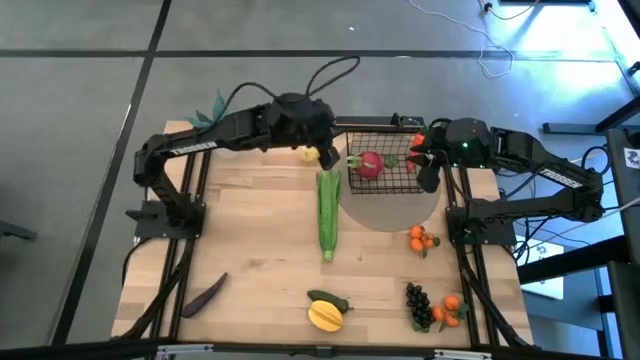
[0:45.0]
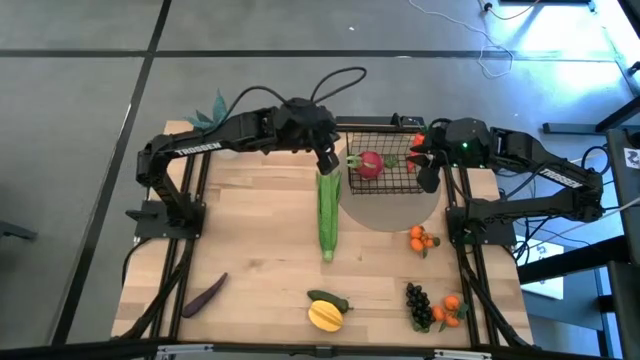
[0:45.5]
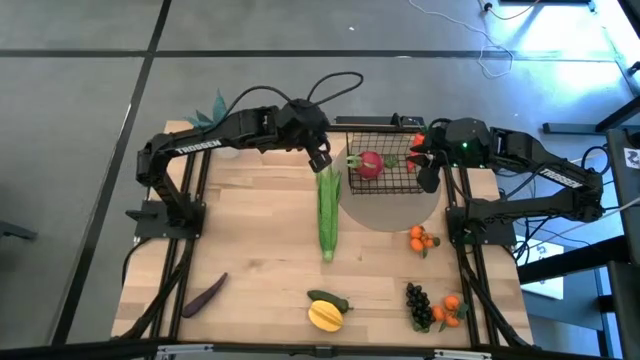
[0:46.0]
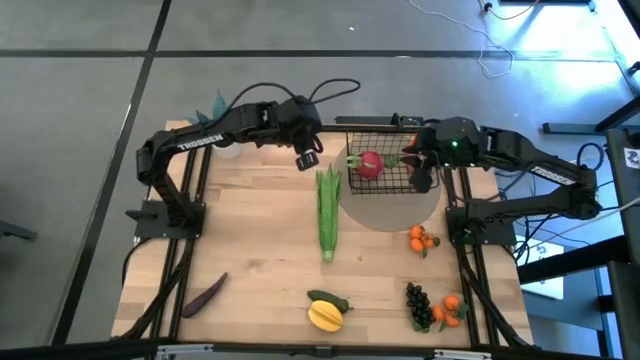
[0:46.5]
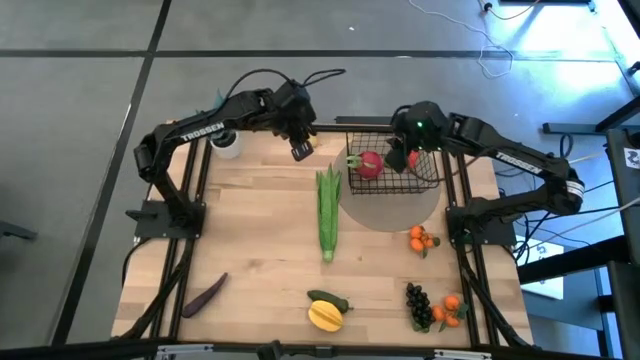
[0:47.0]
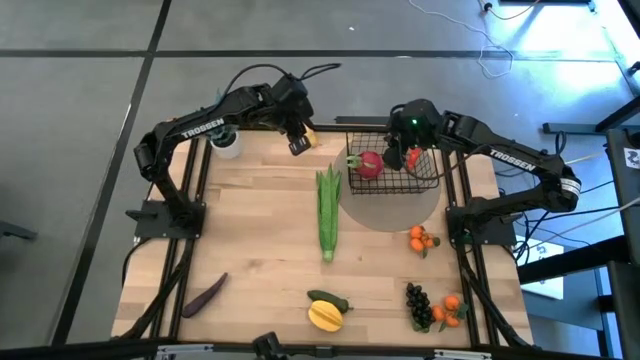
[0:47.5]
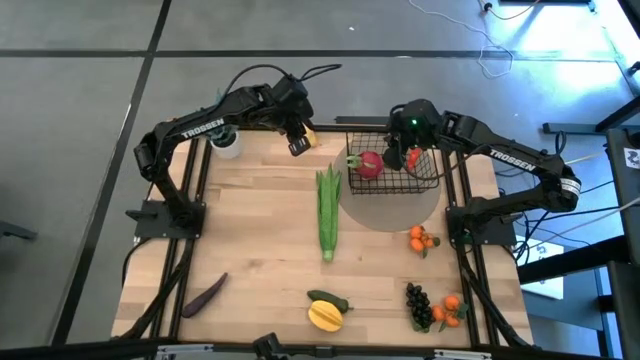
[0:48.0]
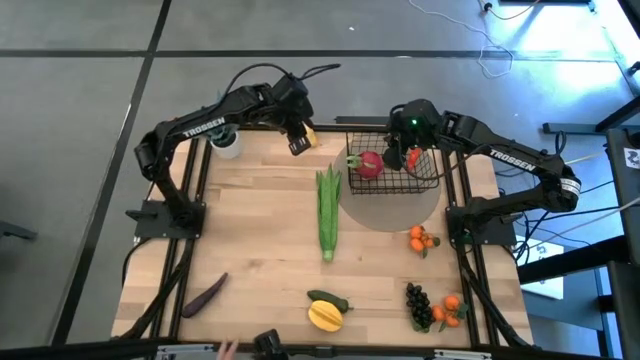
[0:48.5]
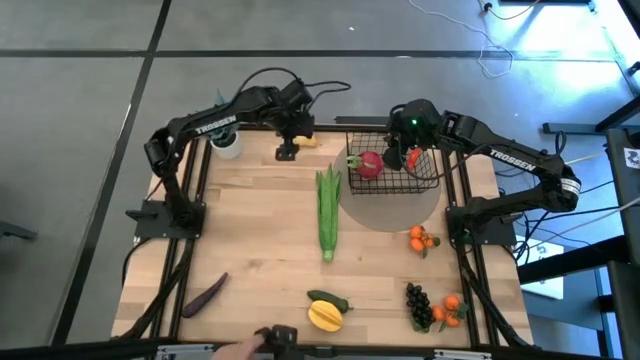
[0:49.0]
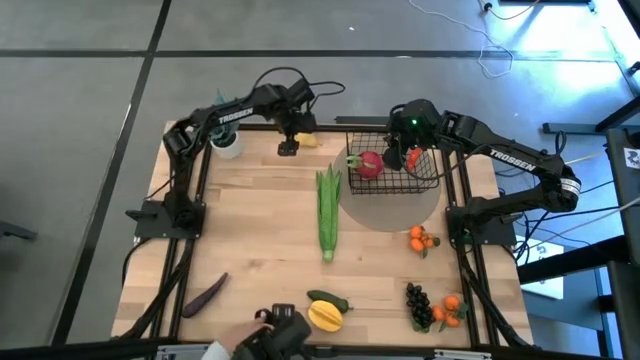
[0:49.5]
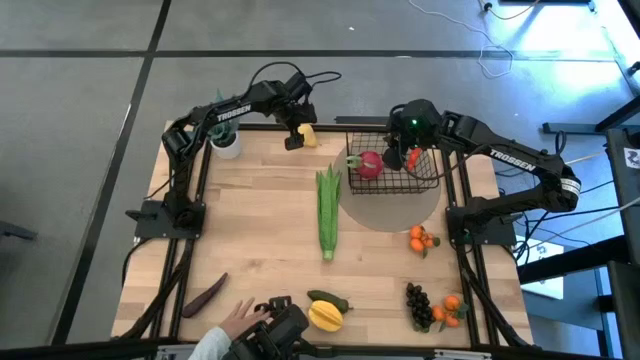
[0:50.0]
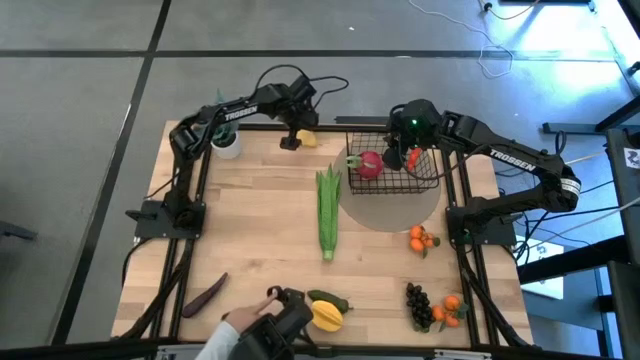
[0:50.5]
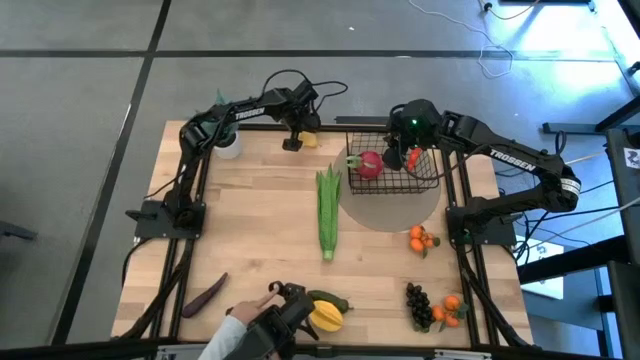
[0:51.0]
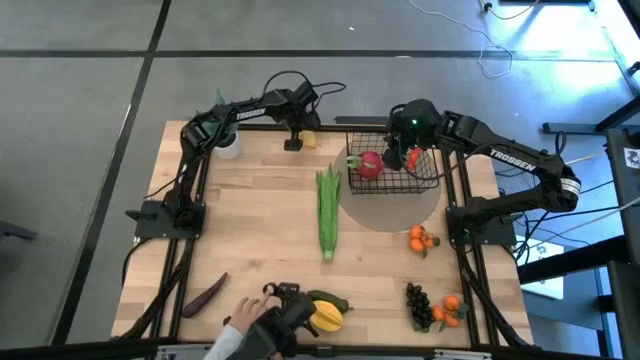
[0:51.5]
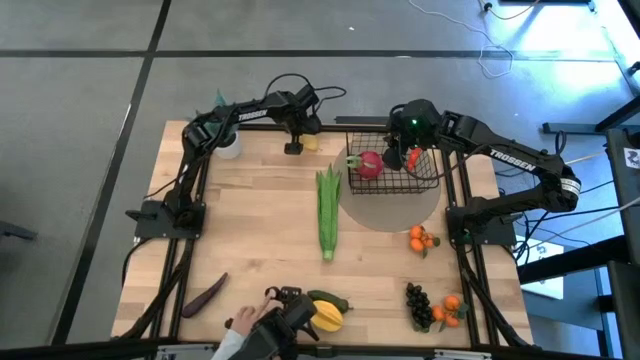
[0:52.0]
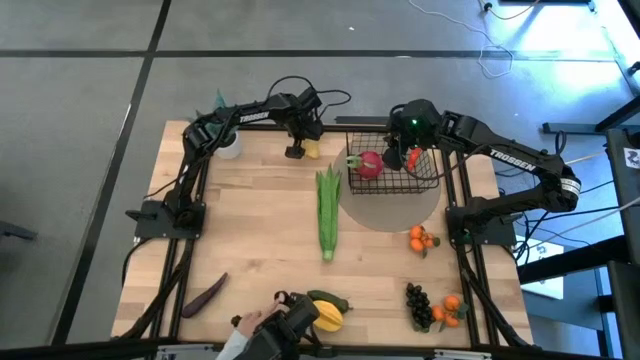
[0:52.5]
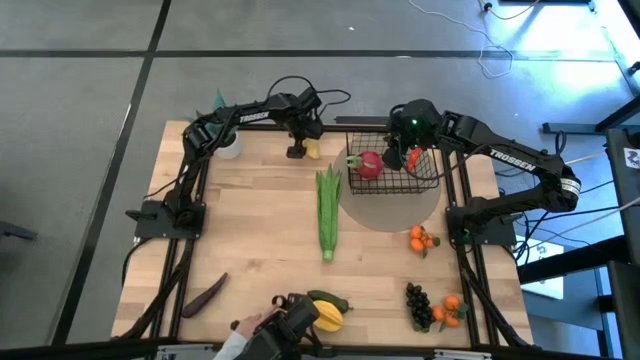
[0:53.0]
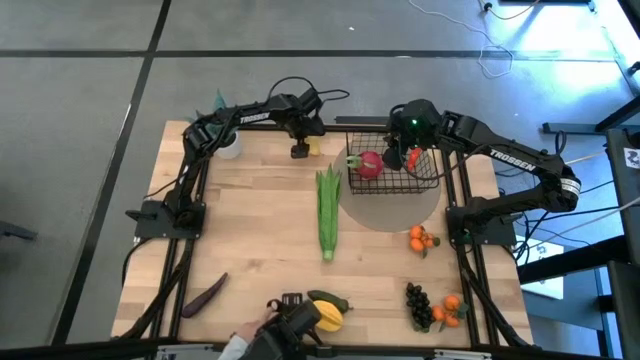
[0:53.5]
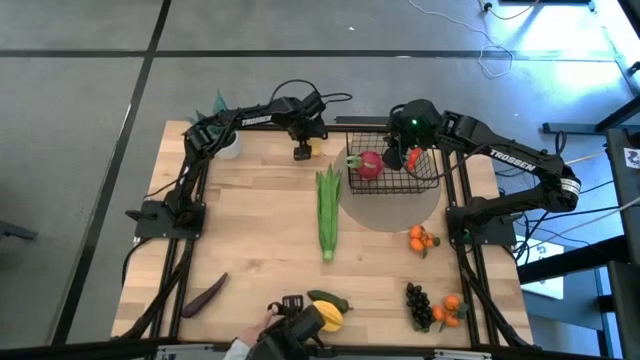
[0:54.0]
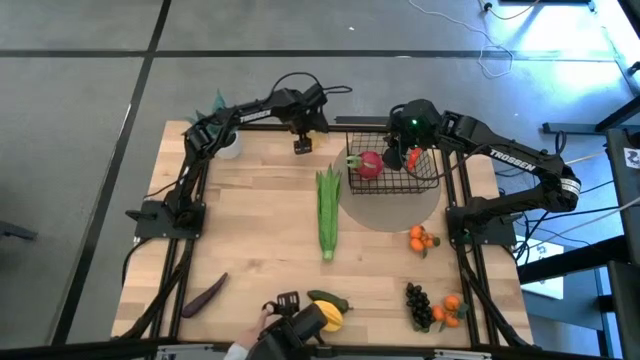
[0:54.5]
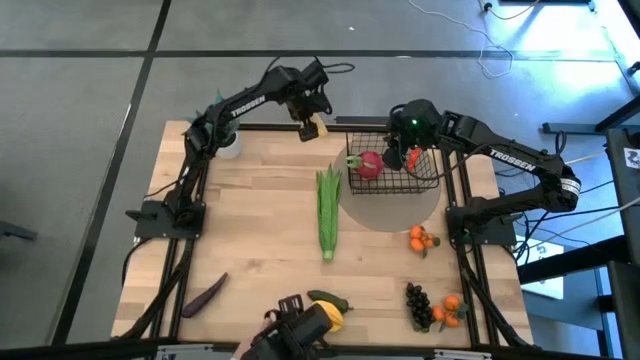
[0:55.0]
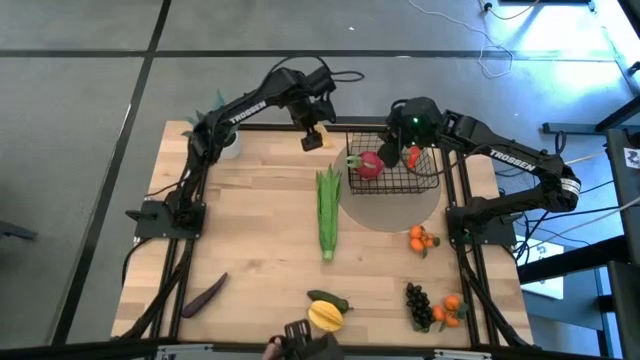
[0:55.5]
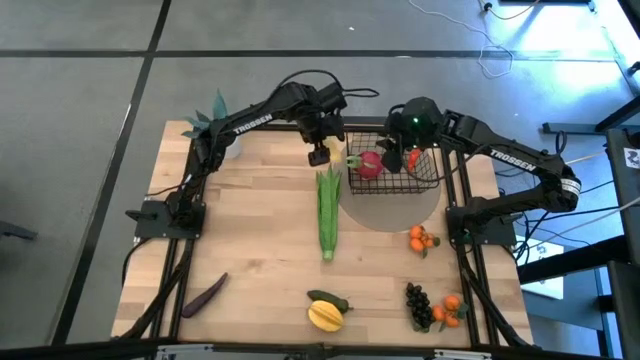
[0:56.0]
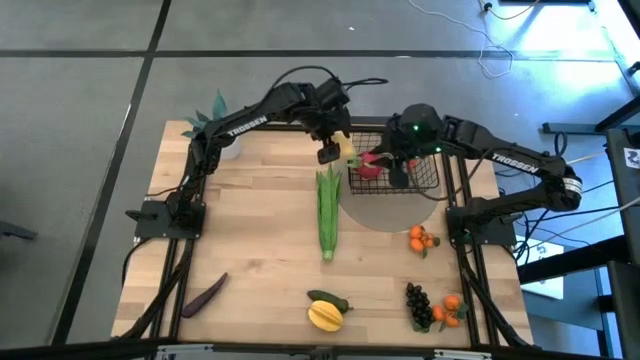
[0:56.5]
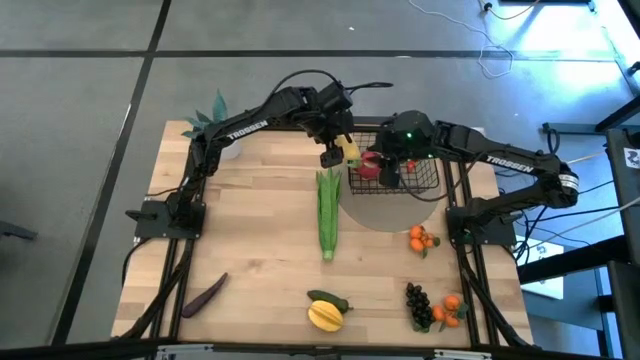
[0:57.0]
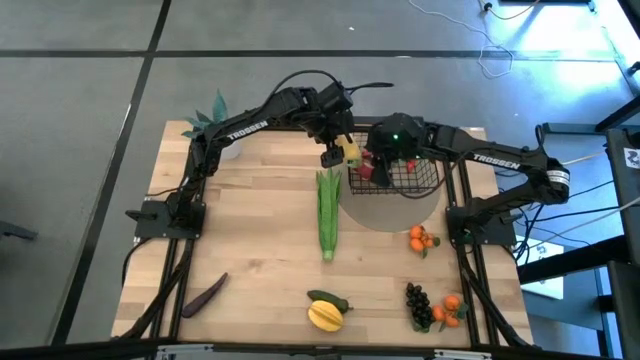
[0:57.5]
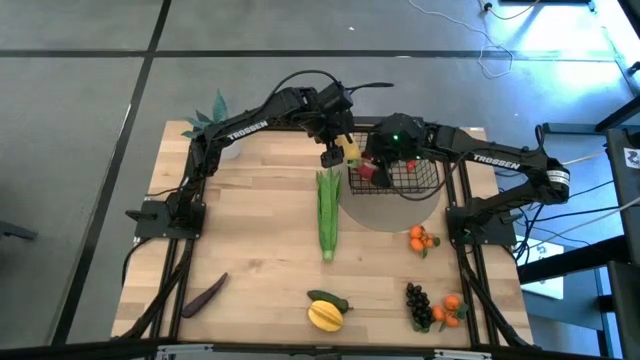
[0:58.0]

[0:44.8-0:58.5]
Task: Build produce basket
Put the pear into the black wire basket

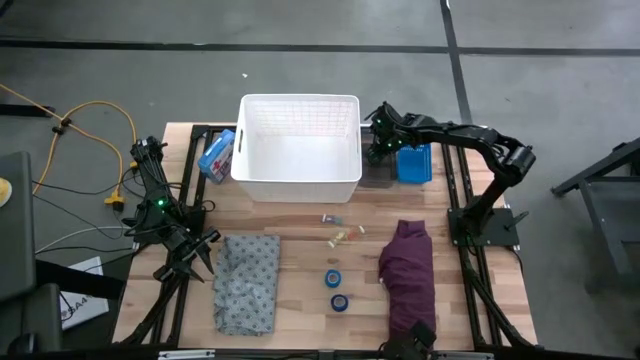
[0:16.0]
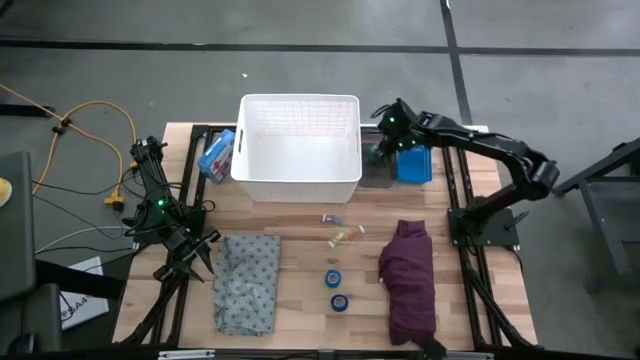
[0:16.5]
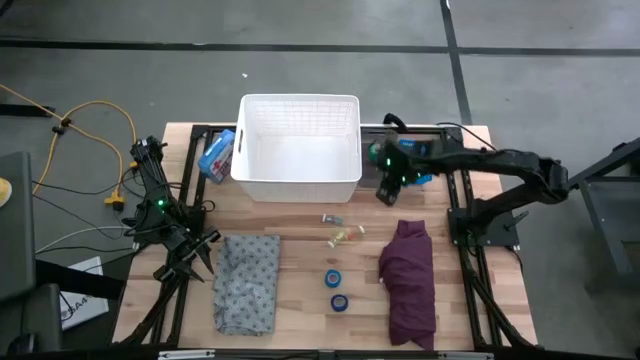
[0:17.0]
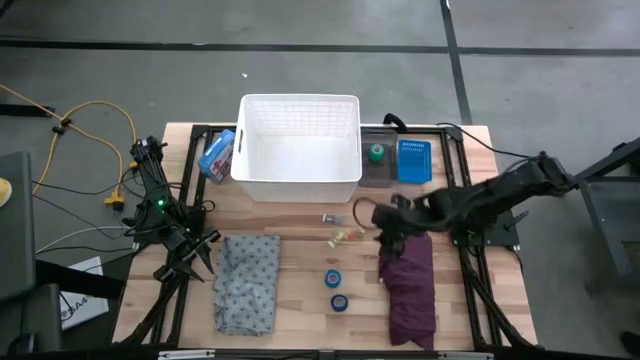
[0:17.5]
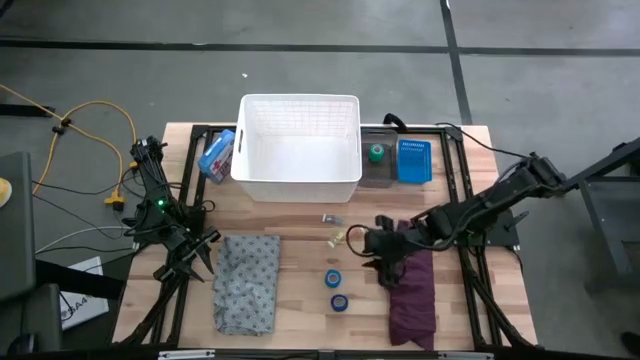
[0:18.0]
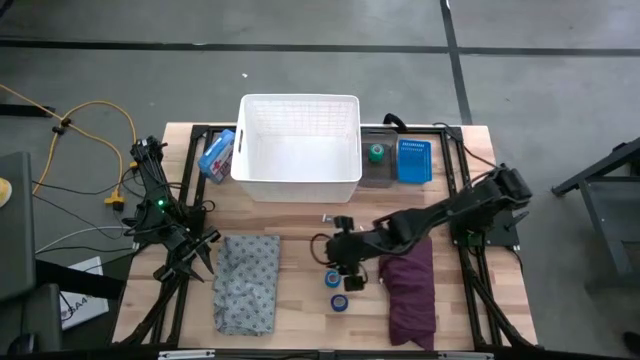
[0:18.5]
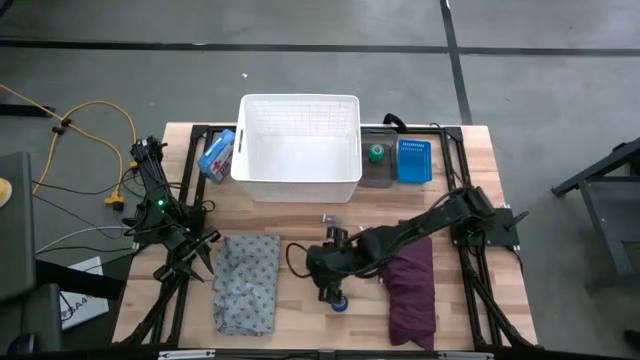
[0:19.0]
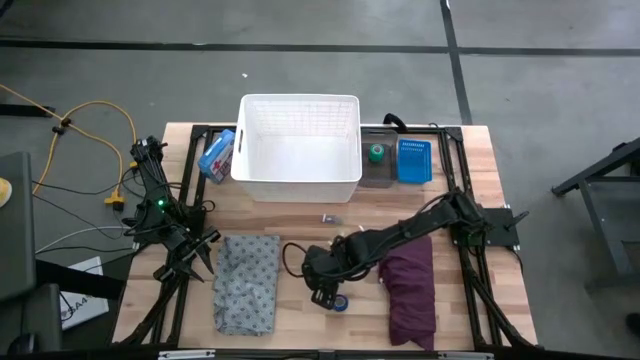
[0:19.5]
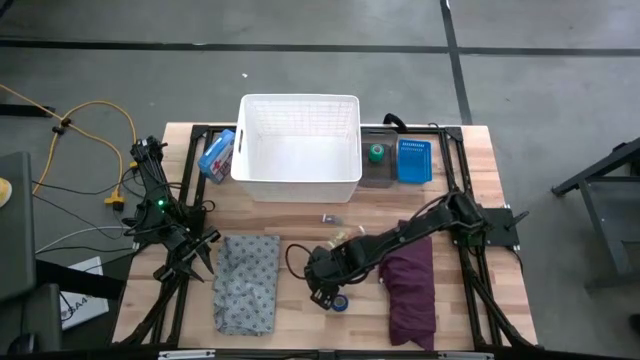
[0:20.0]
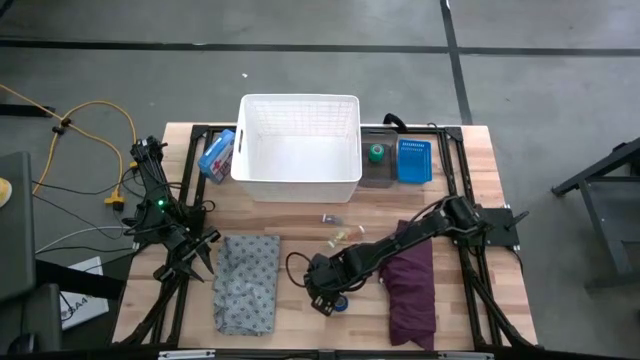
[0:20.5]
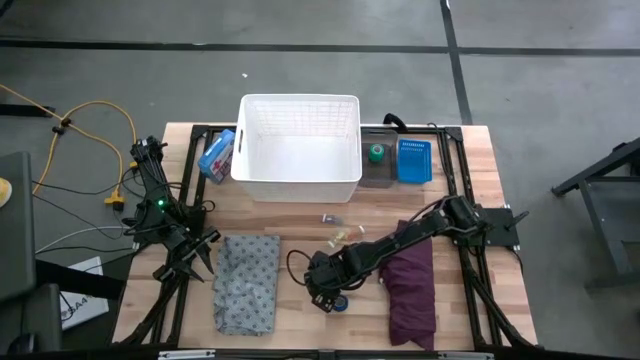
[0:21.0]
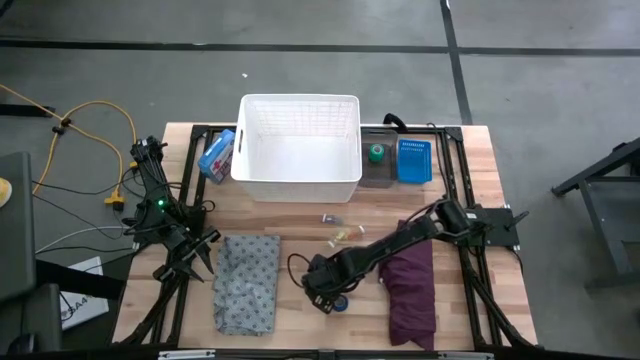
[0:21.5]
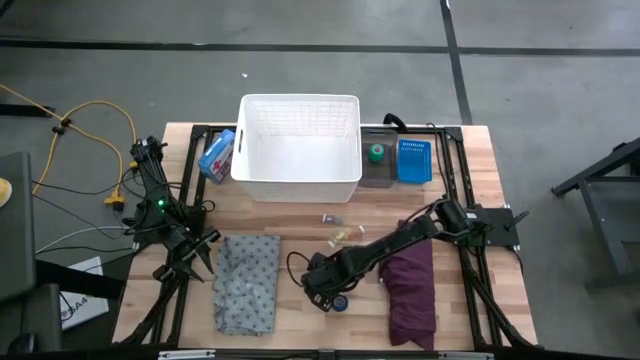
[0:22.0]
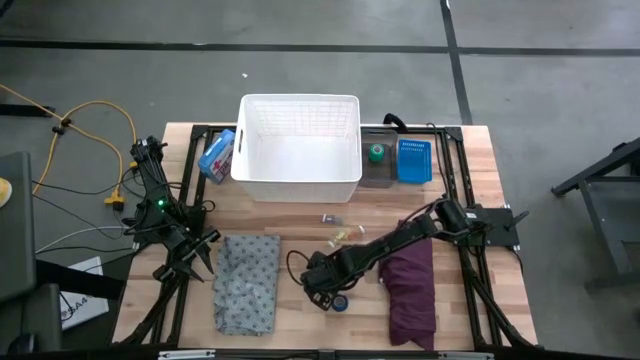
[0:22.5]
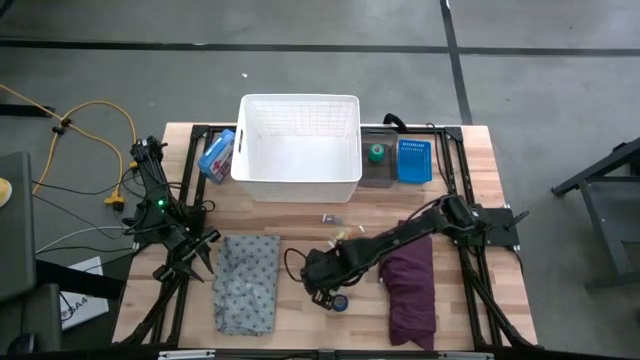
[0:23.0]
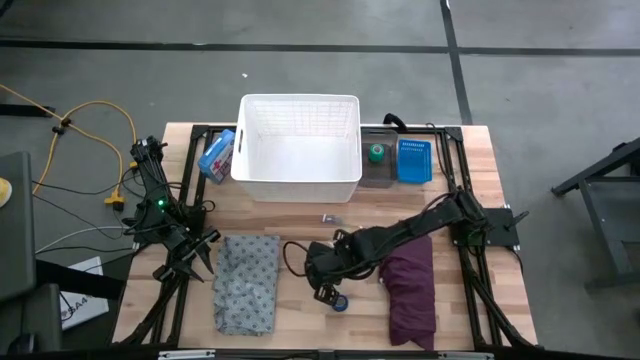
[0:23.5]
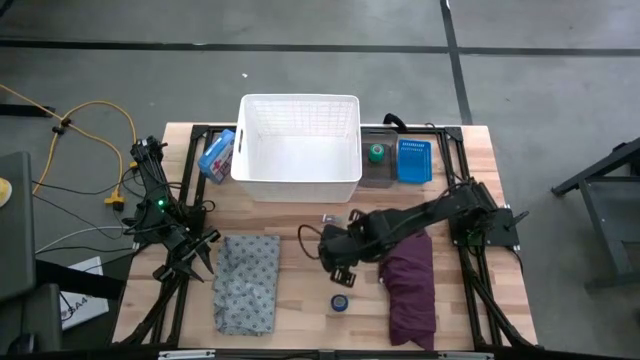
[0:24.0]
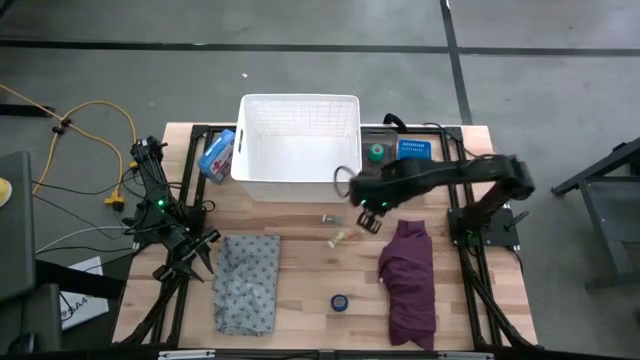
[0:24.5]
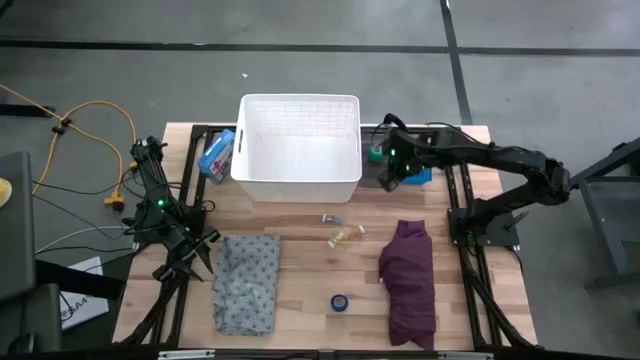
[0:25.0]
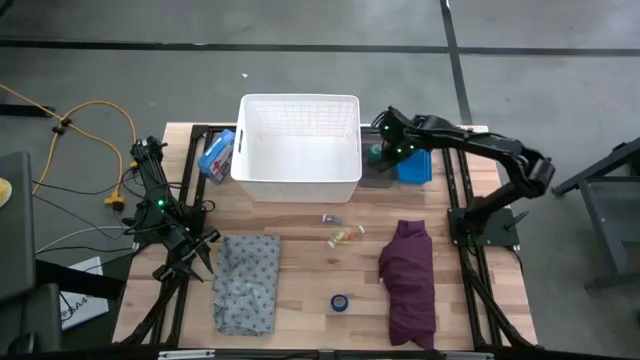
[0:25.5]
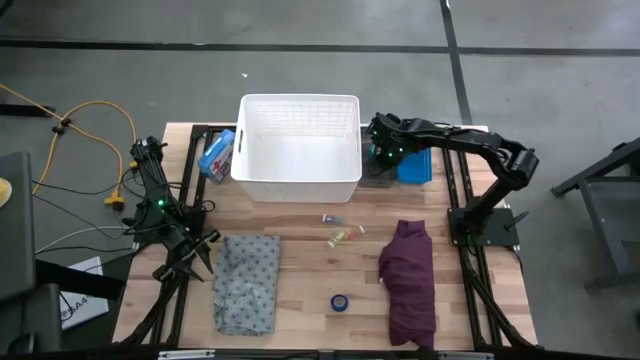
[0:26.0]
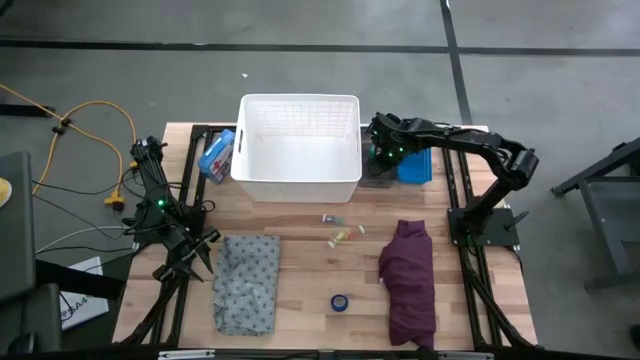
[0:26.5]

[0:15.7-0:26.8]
Task: Pick & Place Medicine items
Put the blue bandage into the black bin
